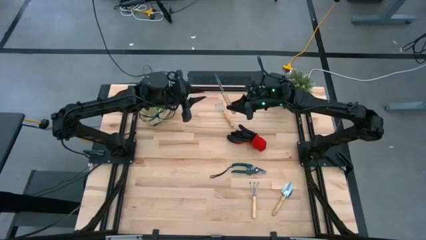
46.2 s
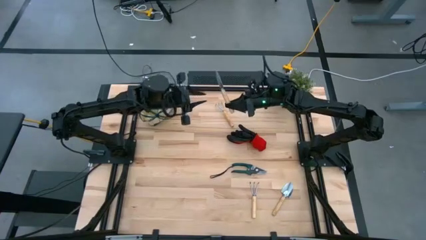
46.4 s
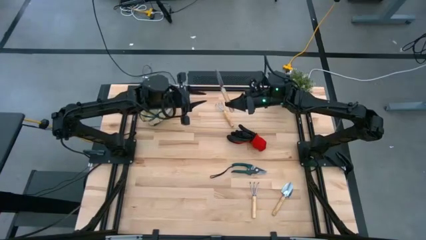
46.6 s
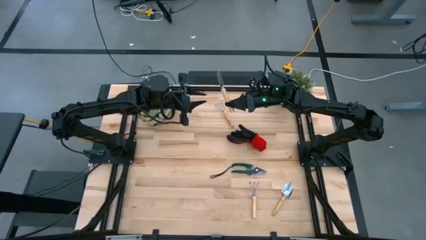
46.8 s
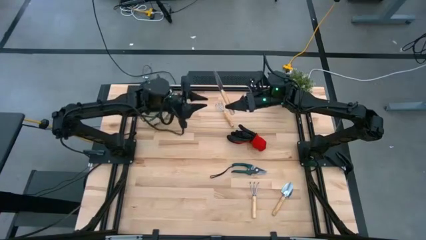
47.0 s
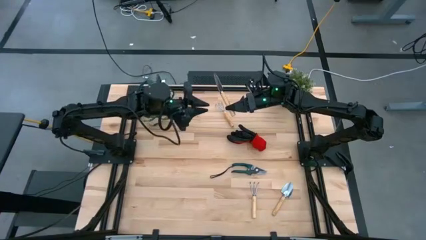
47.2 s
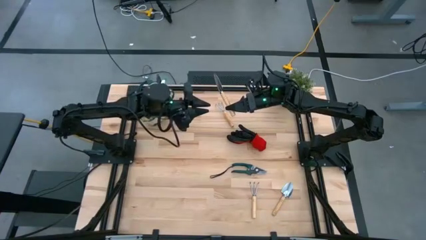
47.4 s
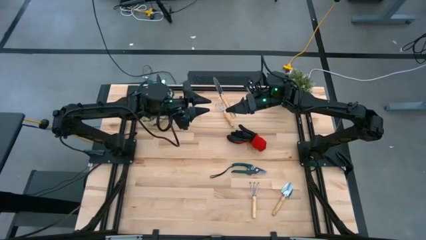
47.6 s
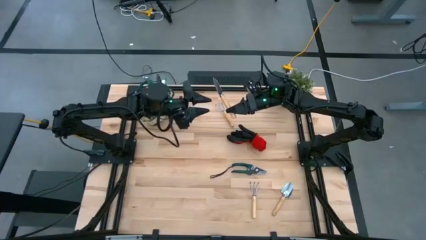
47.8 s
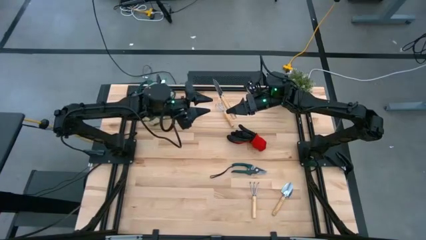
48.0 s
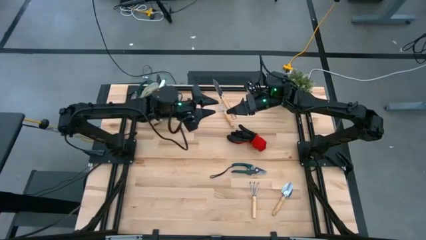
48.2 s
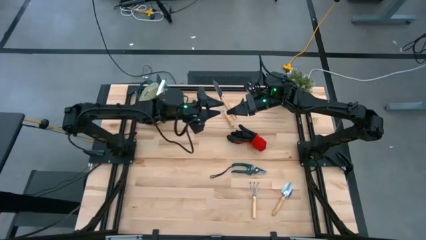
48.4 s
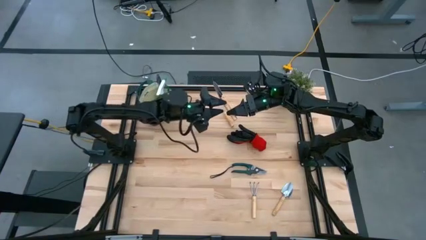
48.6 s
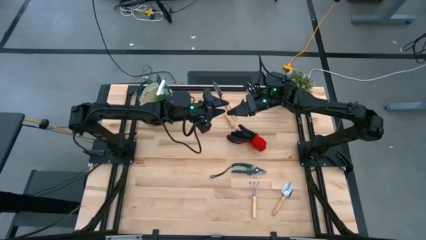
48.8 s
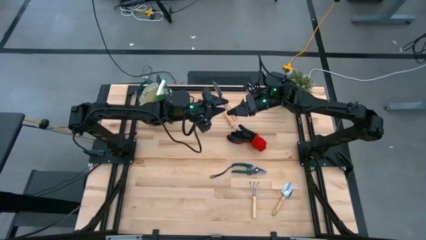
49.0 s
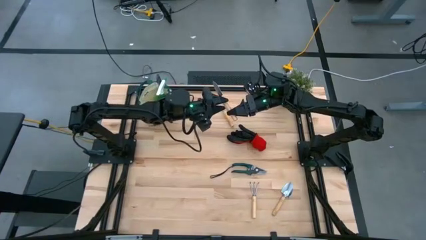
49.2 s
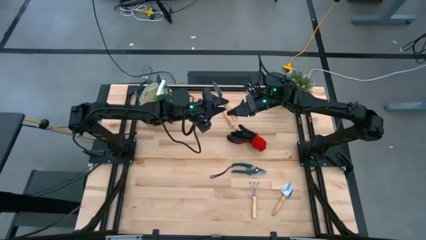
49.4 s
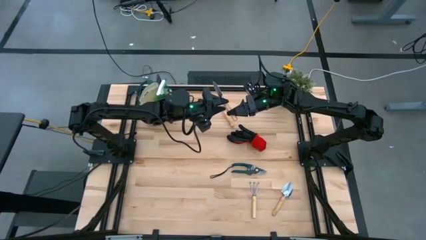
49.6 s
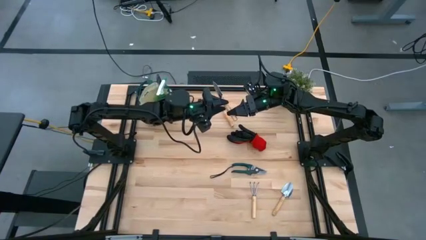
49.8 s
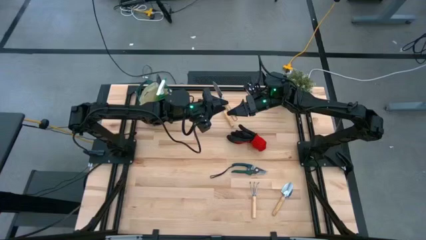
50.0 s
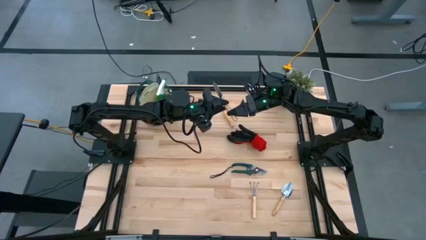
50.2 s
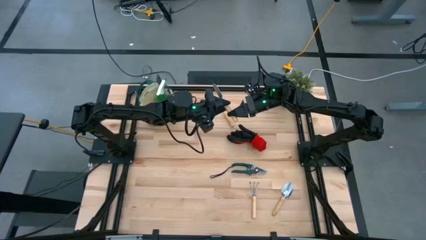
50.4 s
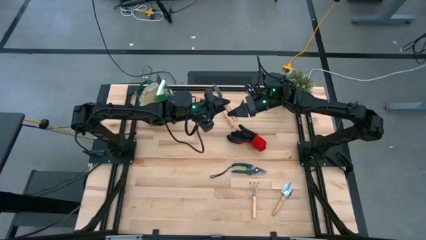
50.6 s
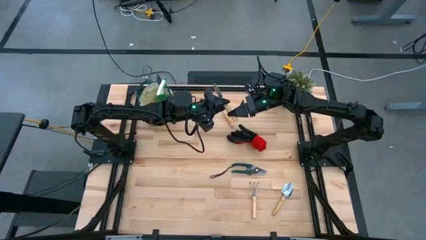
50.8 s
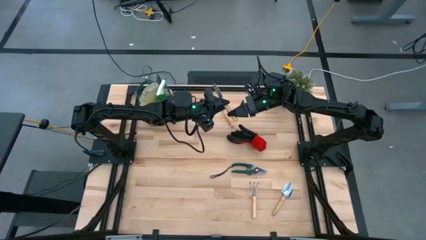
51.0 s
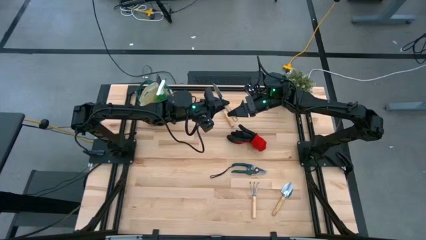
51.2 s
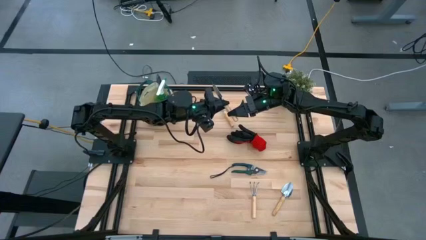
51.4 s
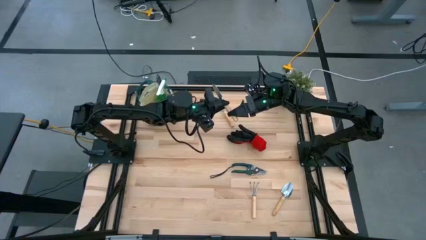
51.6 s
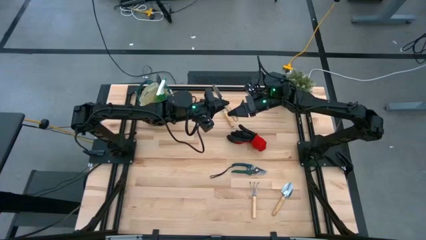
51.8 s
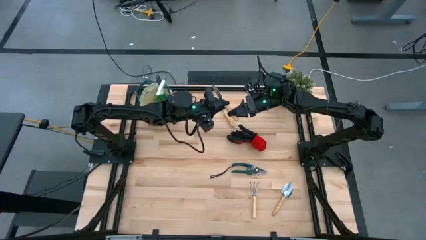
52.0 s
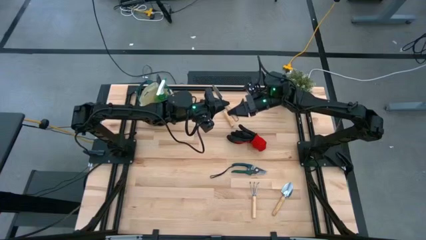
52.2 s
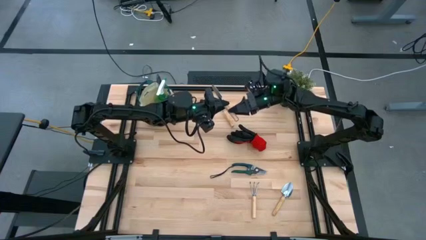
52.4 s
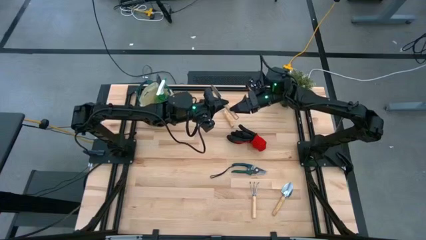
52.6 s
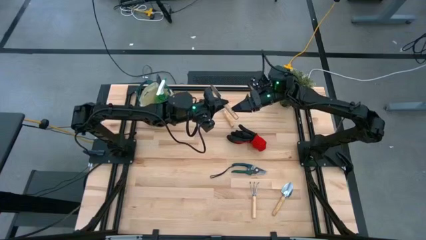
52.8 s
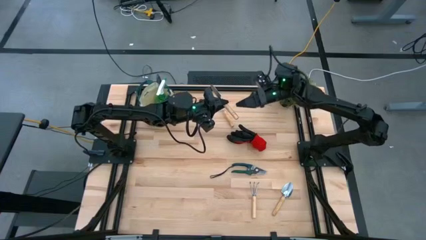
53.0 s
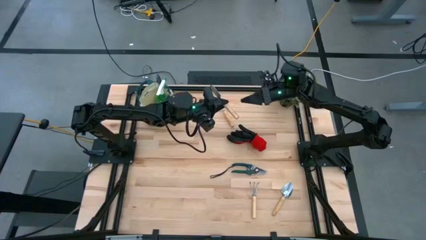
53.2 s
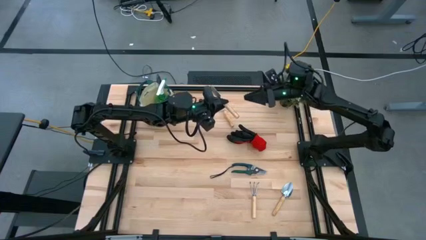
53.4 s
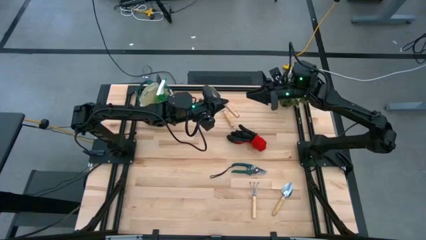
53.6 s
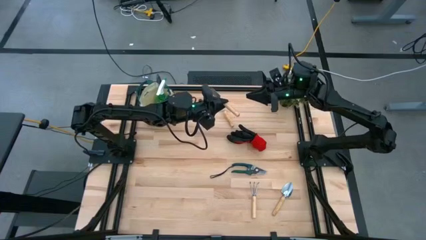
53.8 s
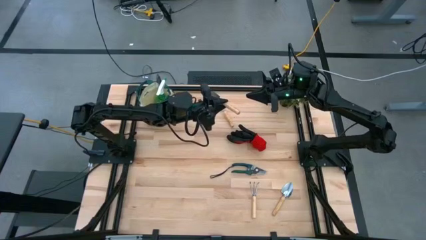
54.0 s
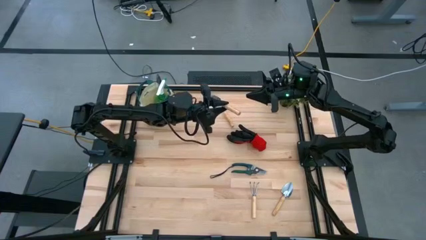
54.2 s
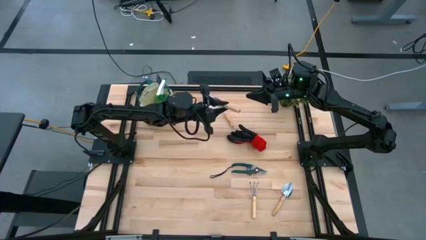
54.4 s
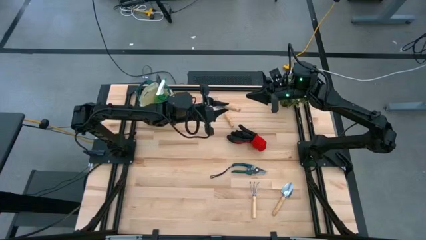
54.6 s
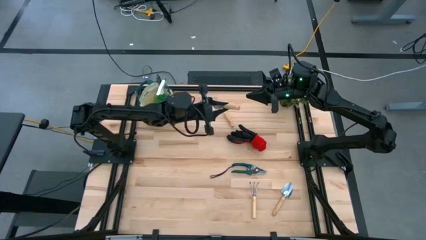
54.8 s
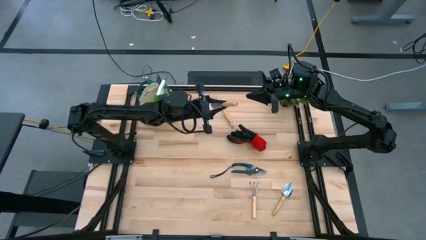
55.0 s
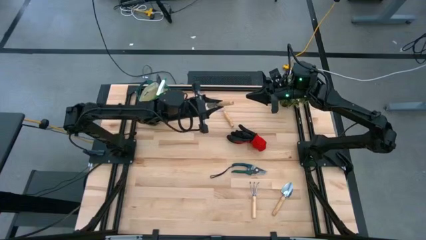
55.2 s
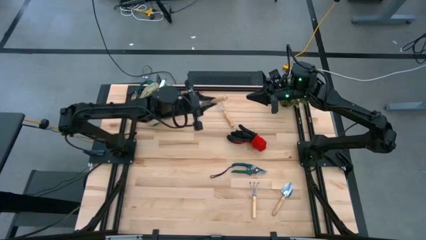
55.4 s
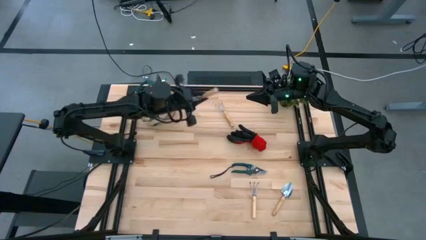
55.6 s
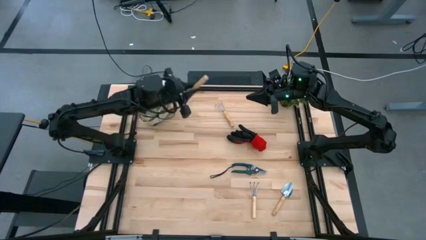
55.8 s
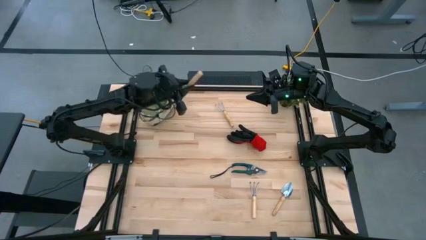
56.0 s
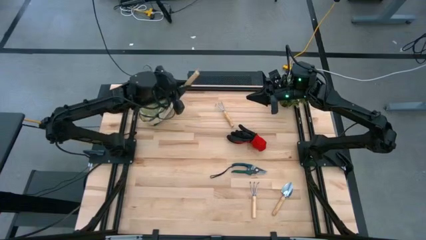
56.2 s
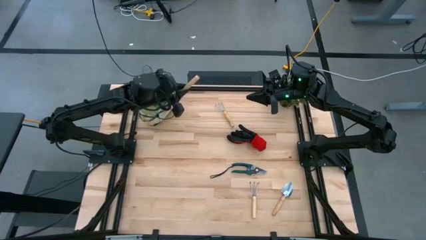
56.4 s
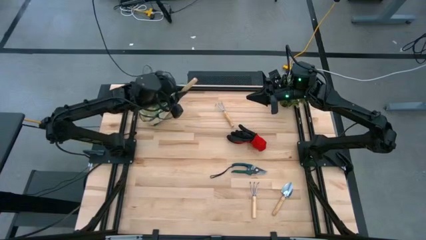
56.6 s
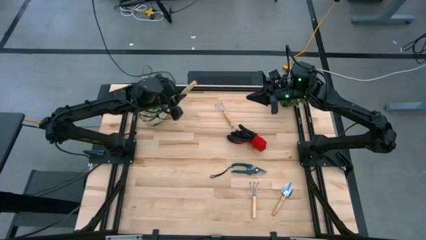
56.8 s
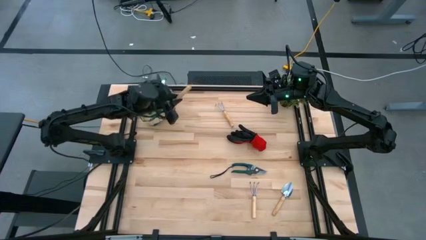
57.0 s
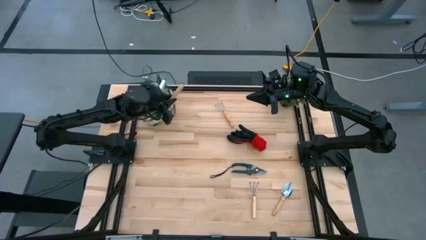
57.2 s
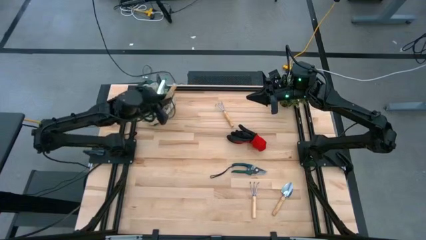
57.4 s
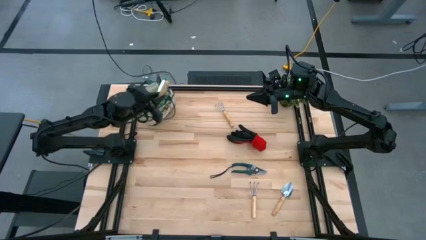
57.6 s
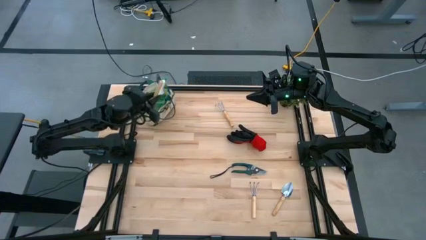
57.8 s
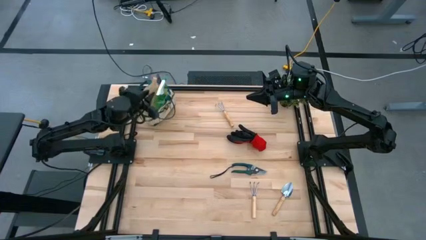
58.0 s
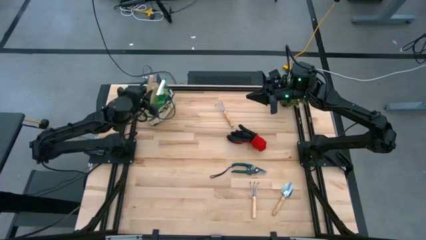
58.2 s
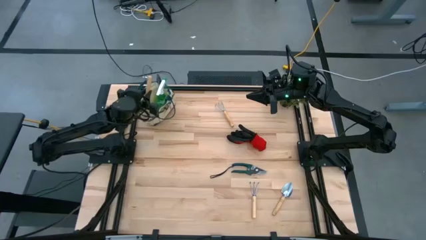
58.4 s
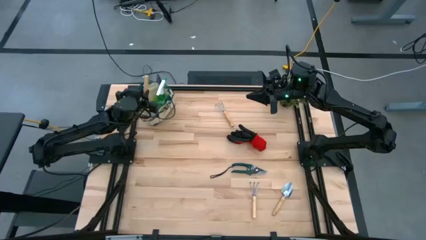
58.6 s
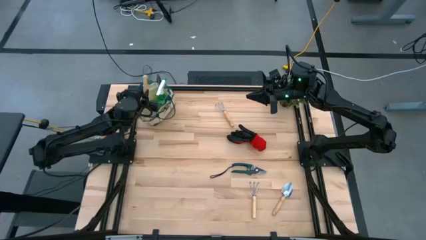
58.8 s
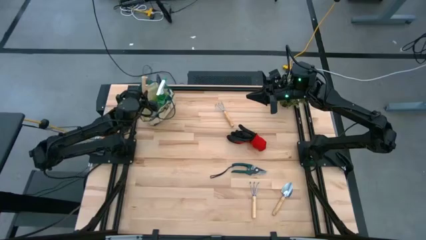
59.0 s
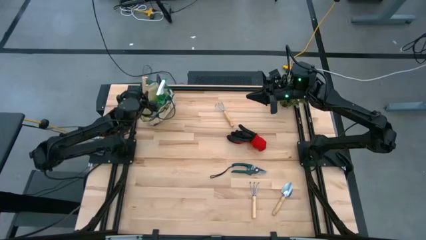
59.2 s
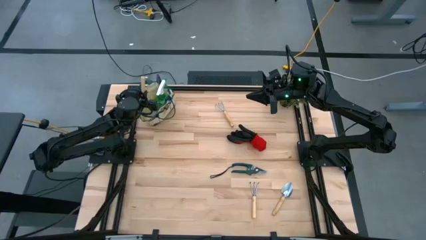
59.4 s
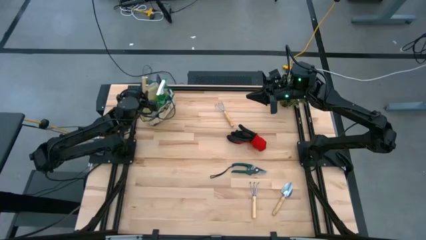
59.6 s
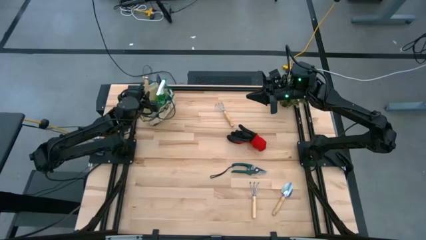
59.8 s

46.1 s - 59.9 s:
Task: Pick & Place Garden tools in Gardening bag
Put the top brown trowel into the gardening bag
